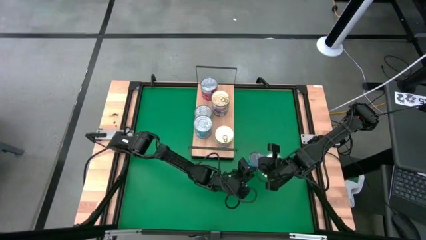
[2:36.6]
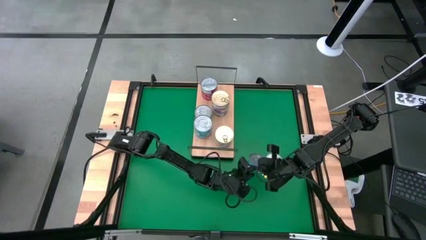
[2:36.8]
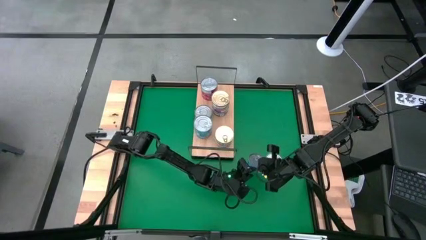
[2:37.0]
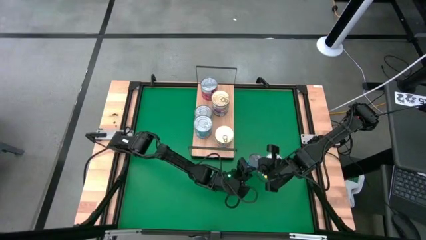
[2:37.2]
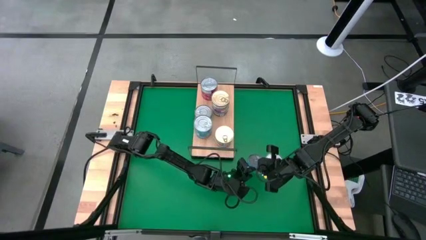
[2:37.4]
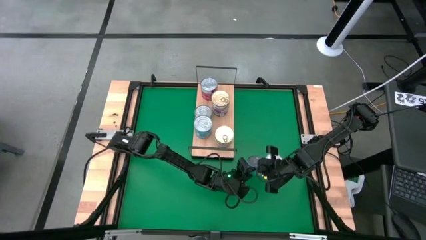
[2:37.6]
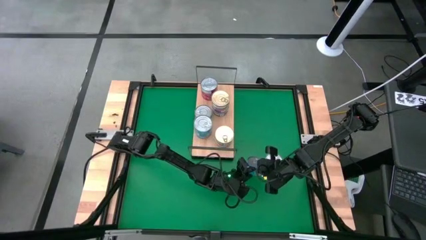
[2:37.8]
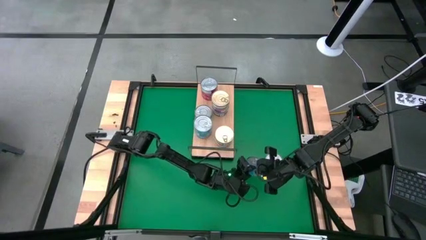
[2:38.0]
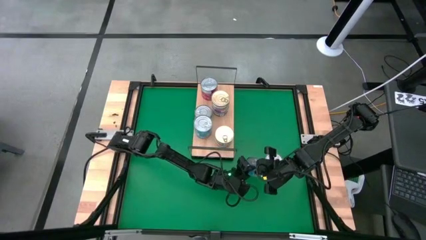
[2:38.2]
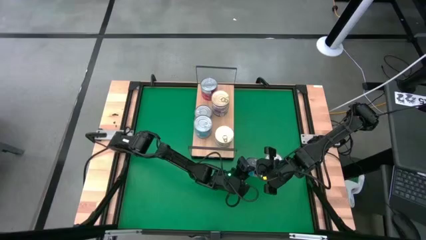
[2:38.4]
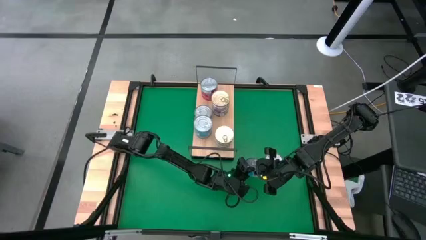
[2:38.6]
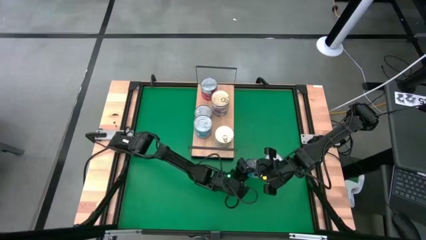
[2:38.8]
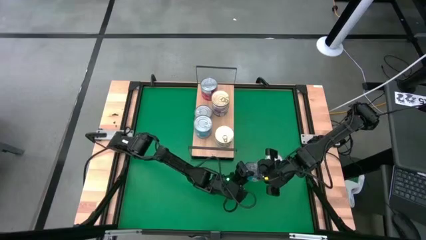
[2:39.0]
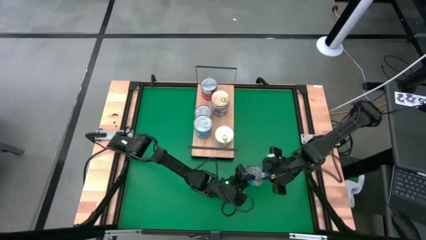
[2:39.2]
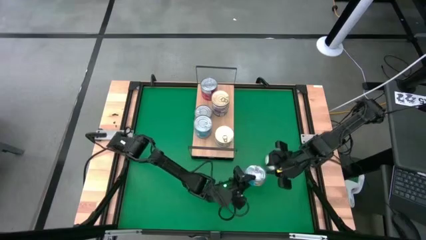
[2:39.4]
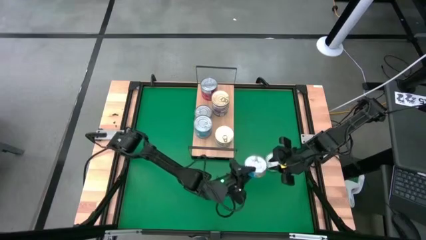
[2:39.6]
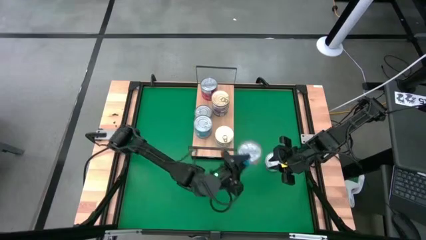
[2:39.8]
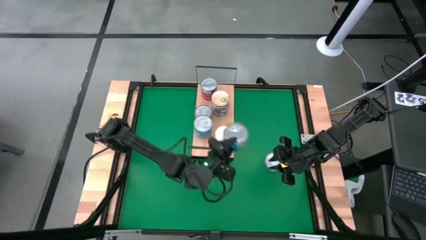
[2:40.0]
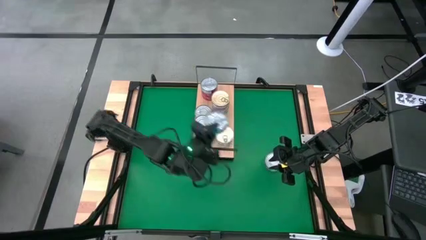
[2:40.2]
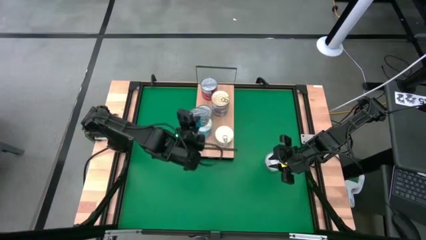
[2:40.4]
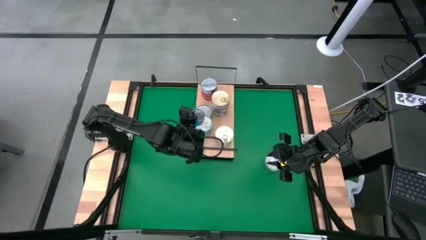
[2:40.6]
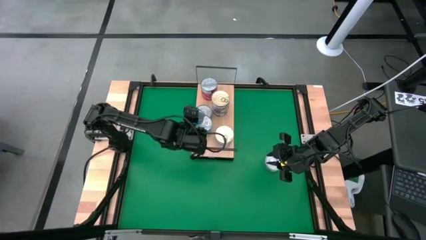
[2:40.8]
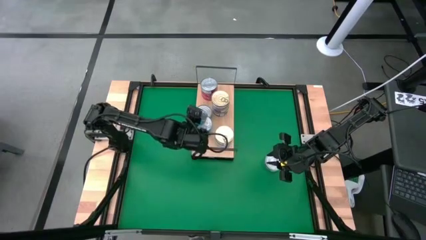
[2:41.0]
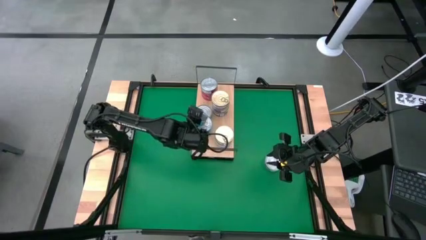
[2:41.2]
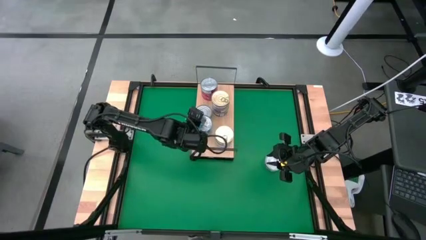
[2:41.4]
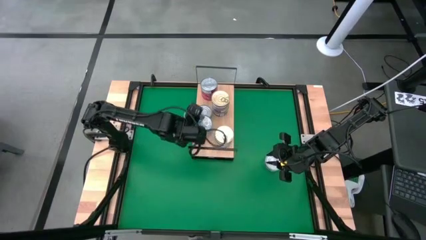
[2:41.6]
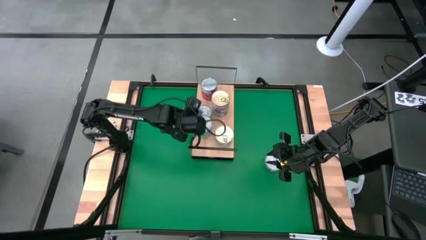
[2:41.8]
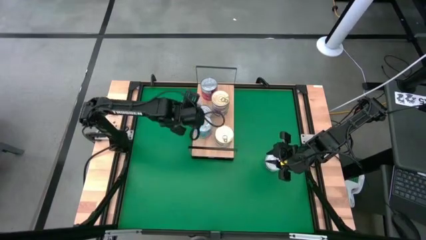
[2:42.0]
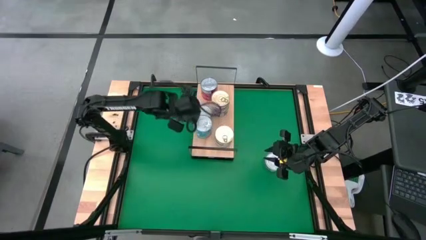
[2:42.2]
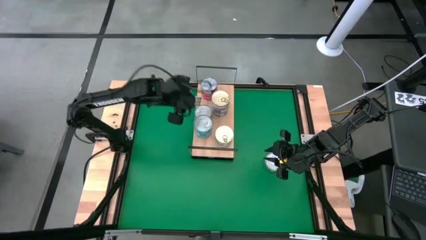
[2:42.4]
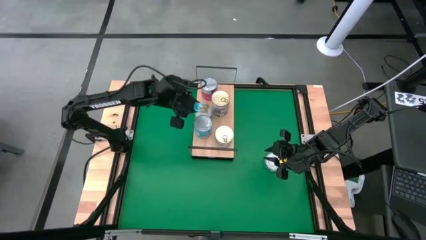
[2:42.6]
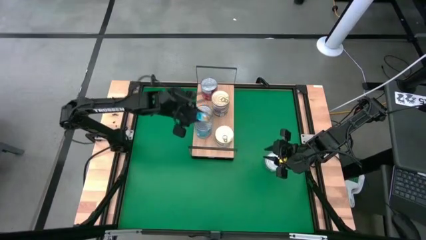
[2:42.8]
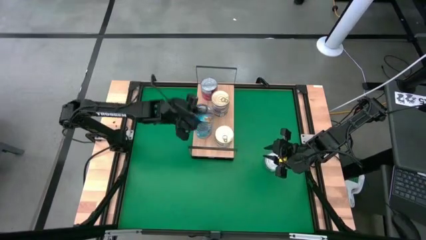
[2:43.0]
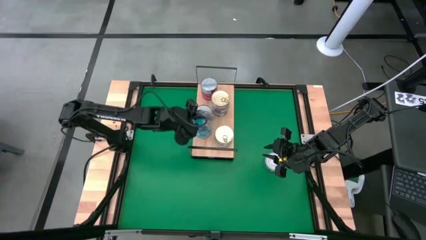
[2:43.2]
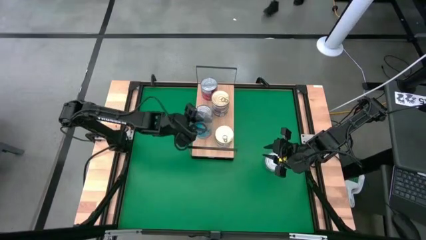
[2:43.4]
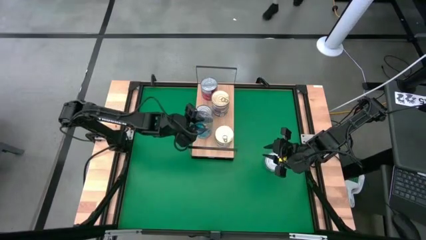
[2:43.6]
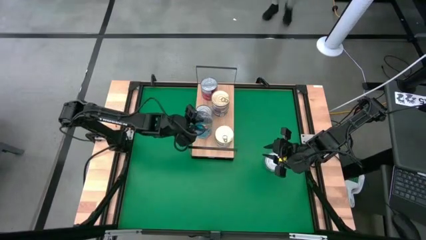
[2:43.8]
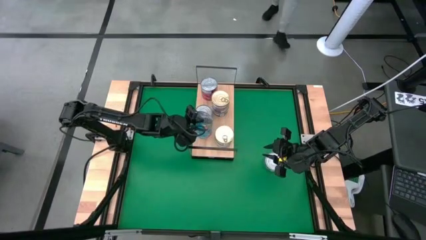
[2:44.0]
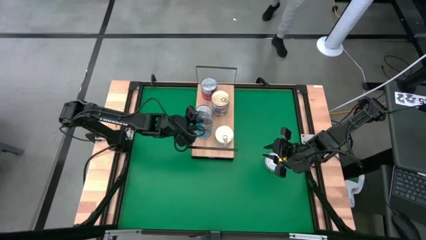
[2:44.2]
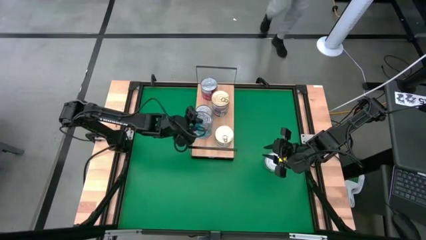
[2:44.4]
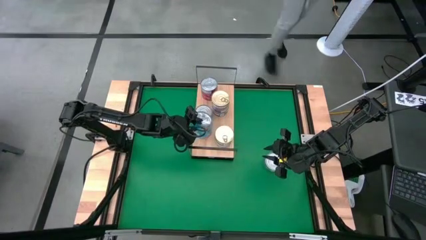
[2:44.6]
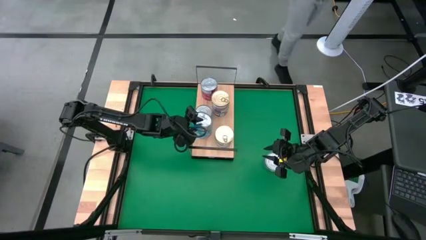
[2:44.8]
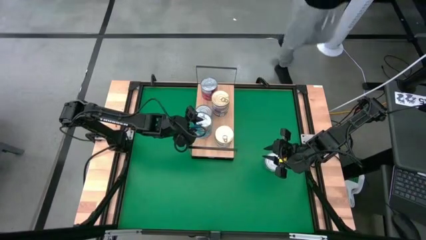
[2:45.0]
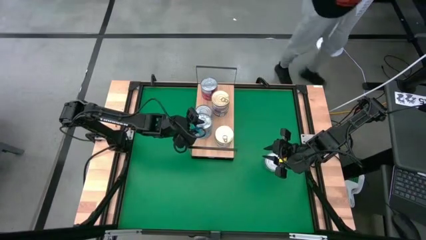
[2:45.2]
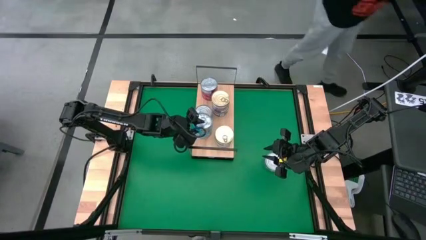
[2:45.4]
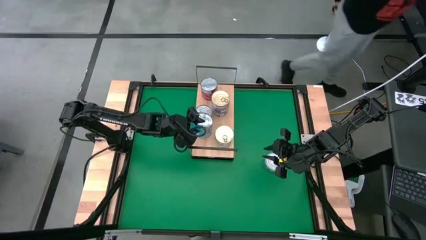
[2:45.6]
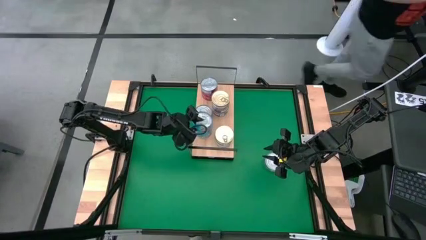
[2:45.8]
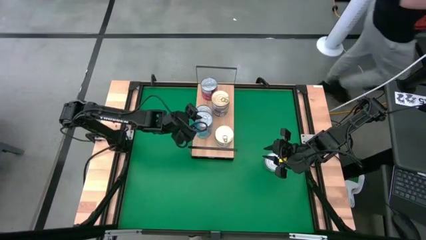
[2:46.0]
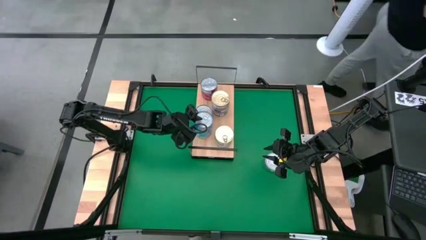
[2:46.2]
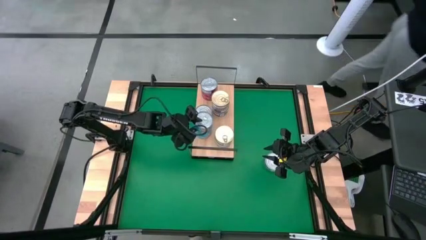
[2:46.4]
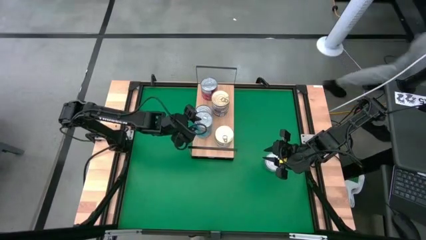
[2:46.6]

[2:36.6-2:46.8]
Task: Stack canned seafood by type on shelf
Stack the light blue tuna can on top of the light blue tuna can on the shelf
